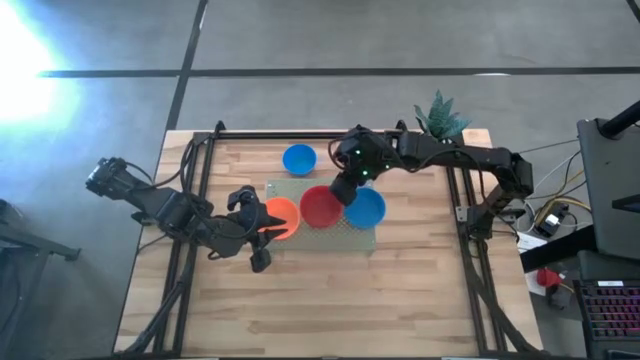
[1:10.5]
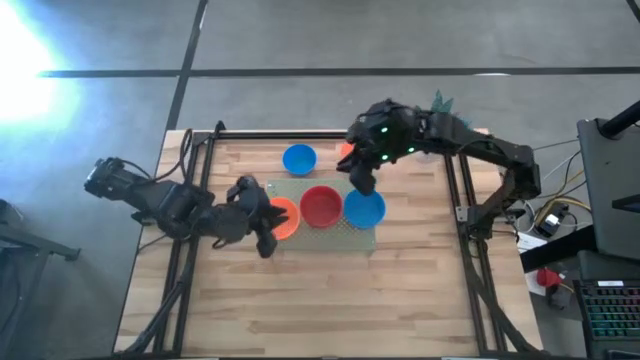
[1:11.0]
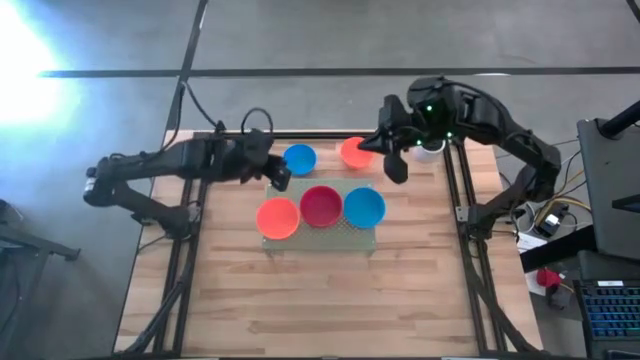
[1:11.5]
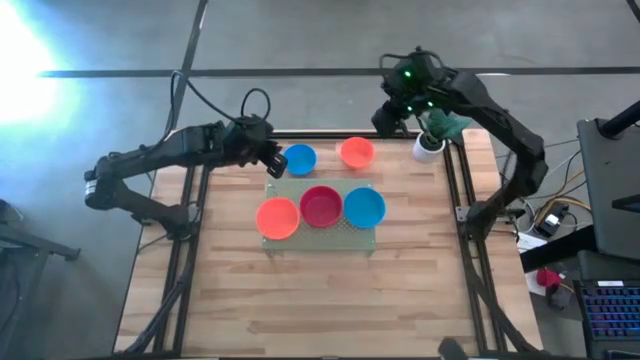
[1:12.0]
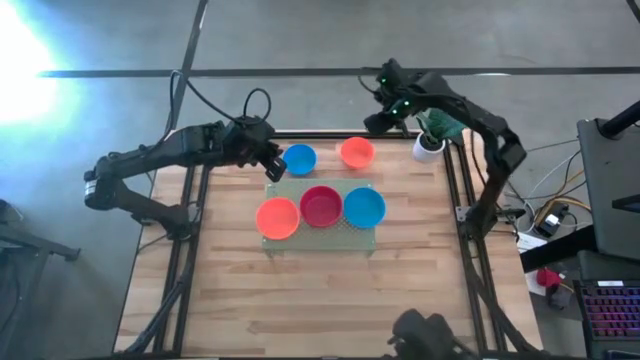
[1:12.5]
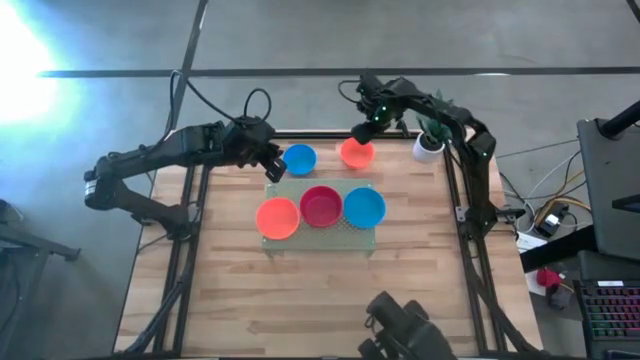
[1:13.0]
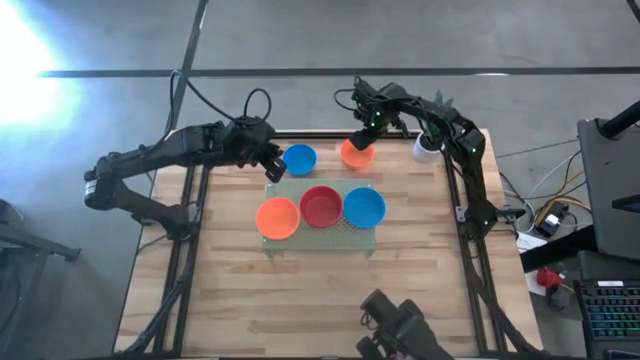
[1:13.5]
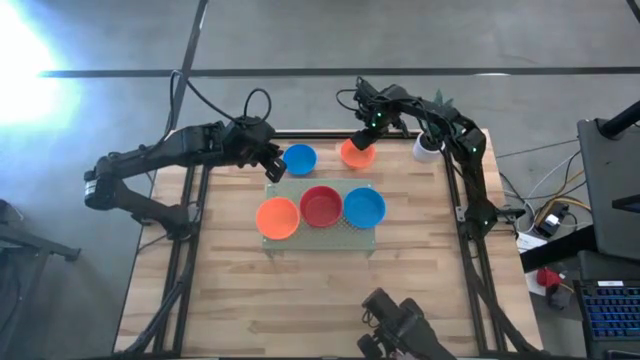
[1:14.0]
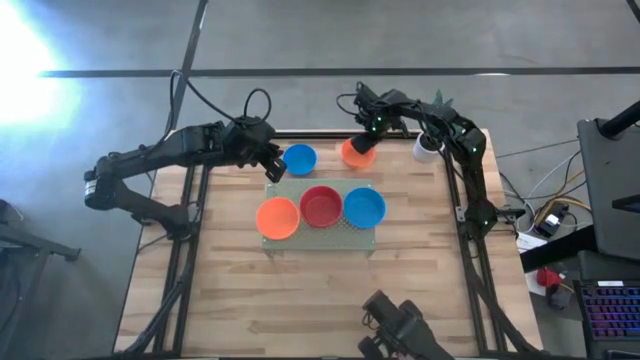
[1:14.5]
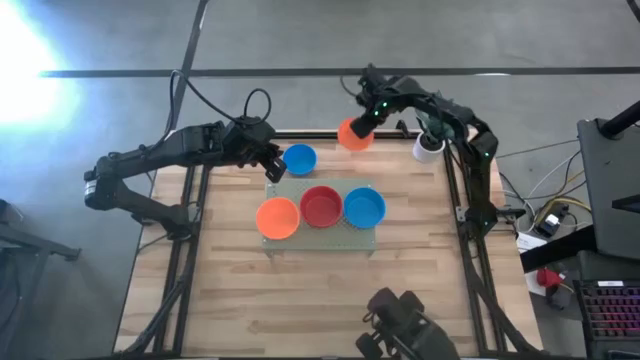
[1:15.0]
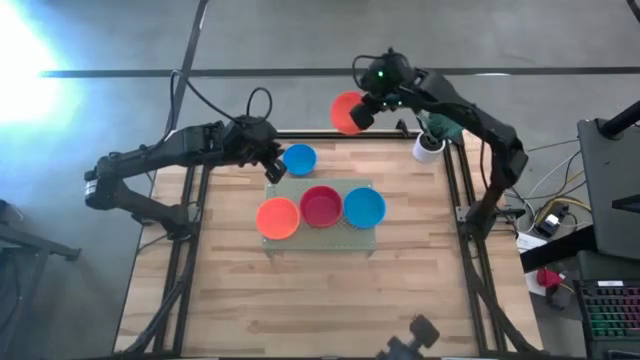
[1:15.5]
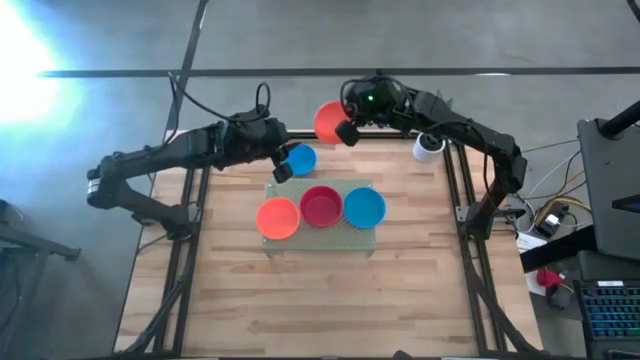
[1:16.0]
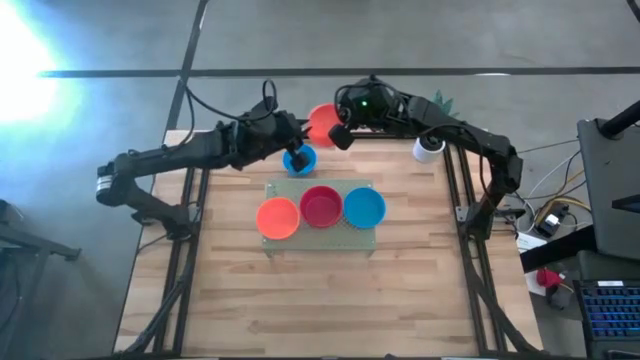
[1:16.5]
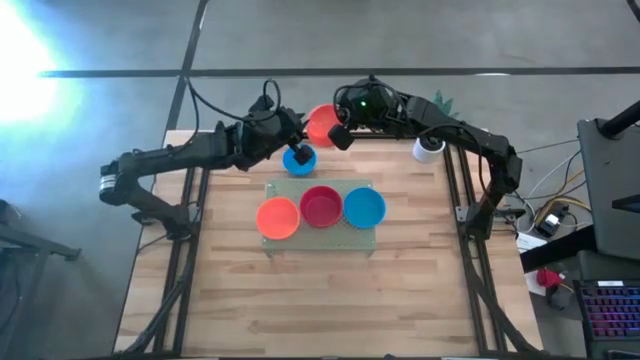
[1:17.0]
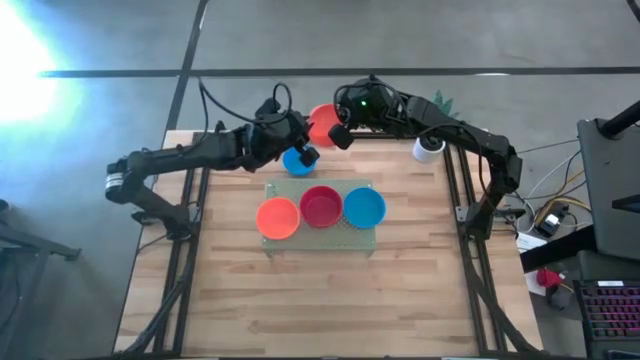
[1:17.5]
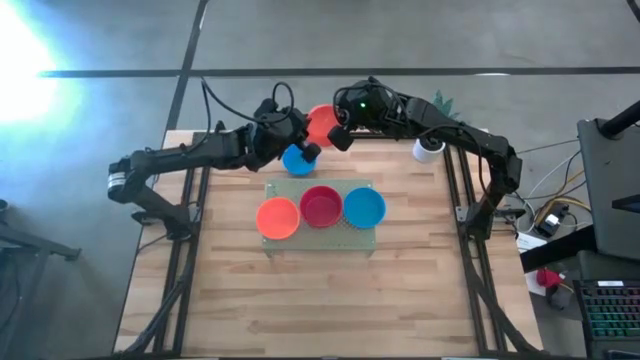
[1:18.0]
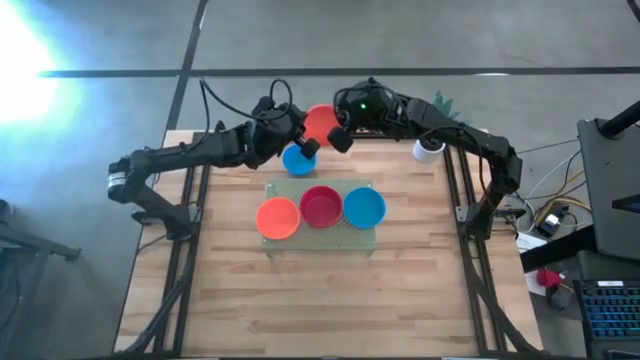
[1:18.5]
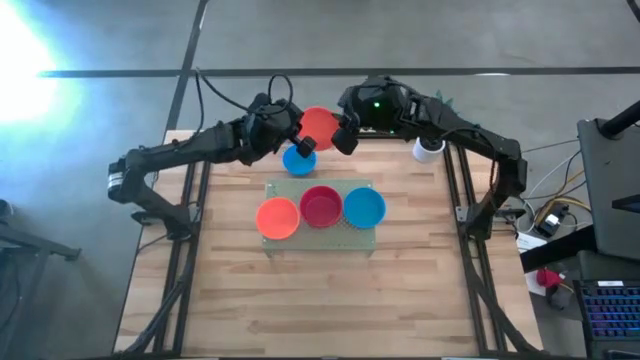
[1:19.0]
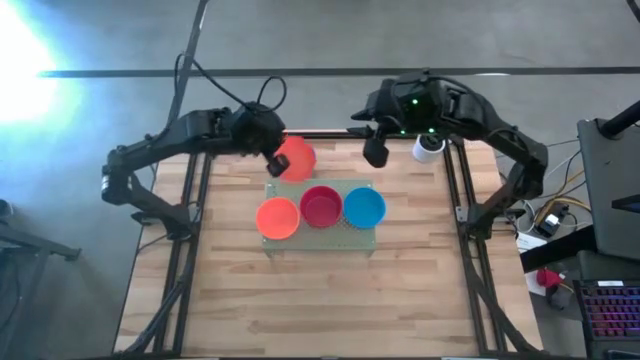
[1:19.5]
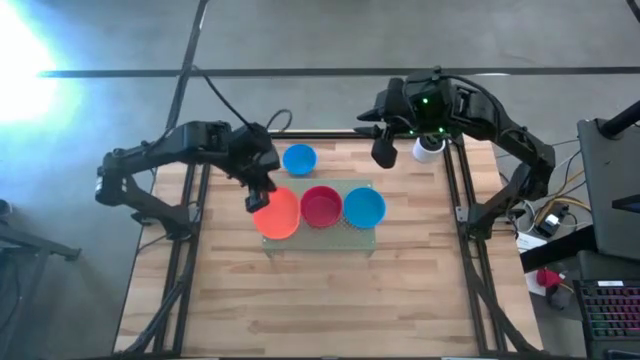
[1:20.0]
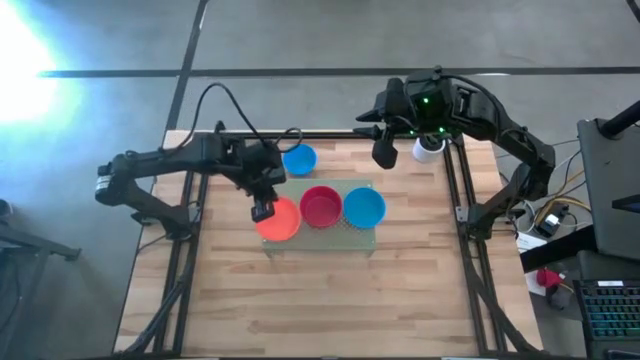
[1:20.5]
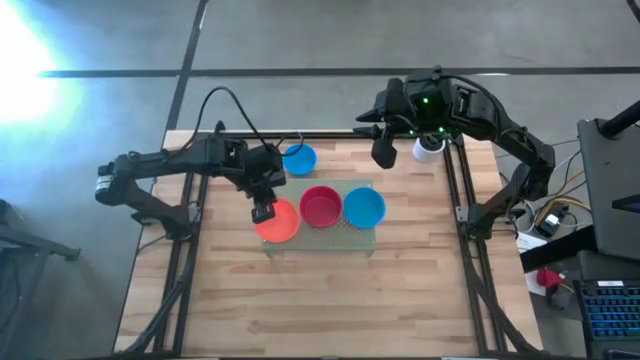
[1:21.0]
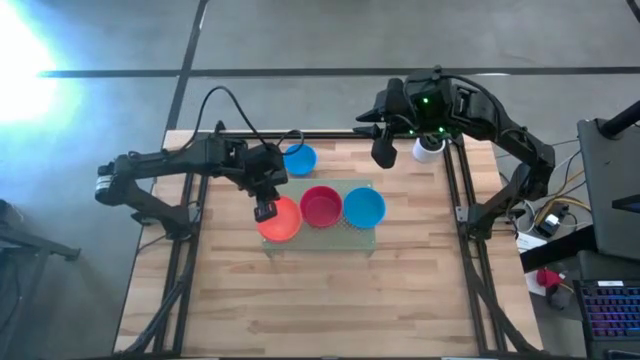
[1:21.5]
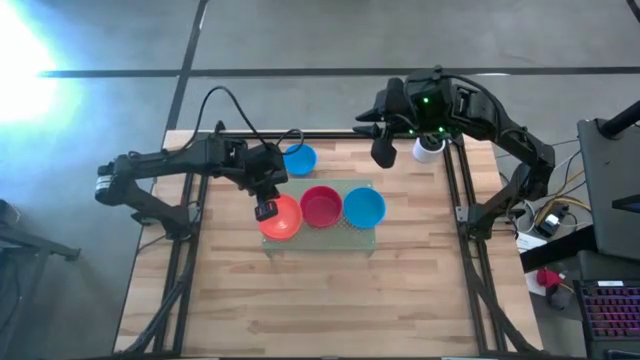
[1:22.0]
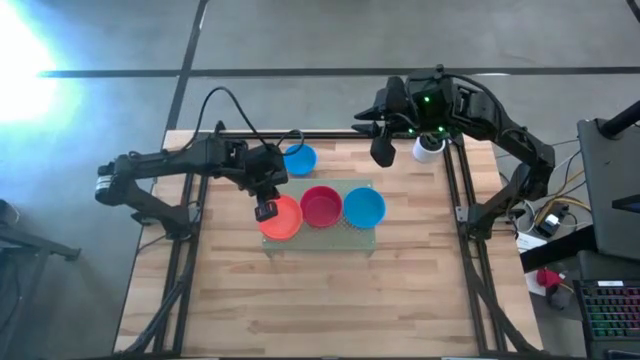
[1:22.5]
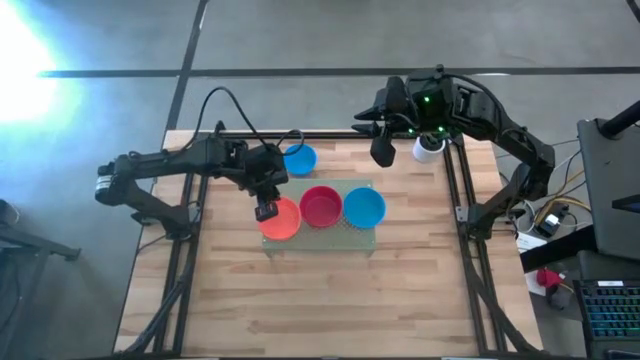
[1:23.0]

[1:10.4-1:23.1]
Task: Pick & Place Mini bowls
Stack the orange bowl on top of the other orange bowls on the shelf

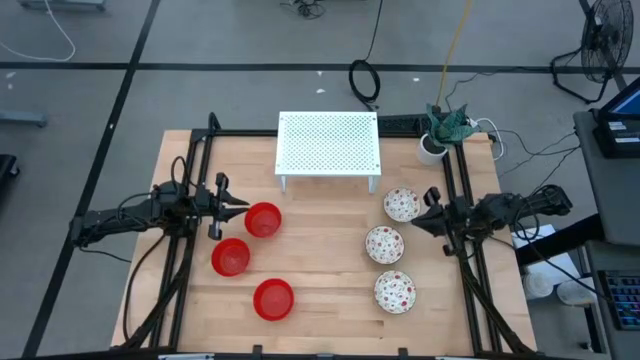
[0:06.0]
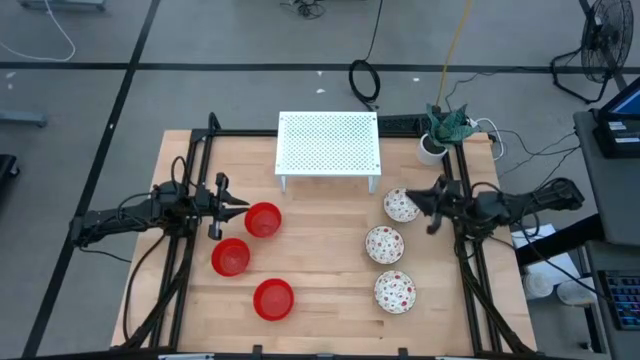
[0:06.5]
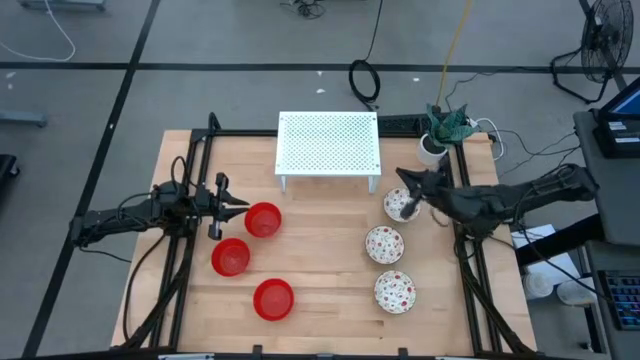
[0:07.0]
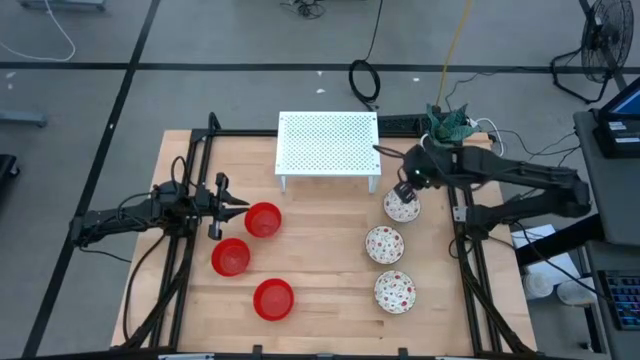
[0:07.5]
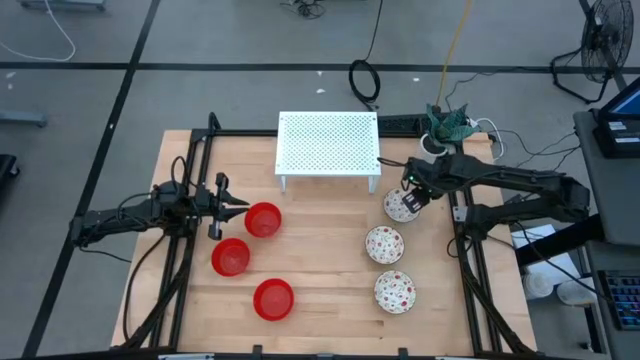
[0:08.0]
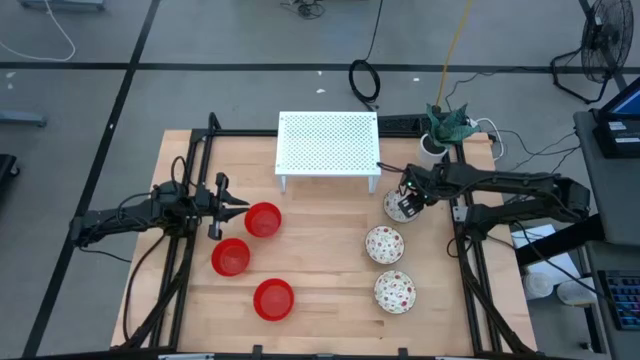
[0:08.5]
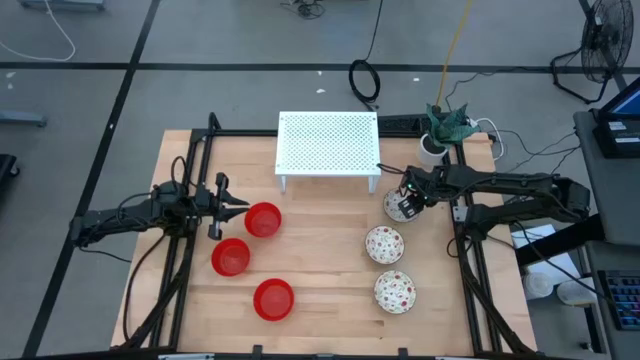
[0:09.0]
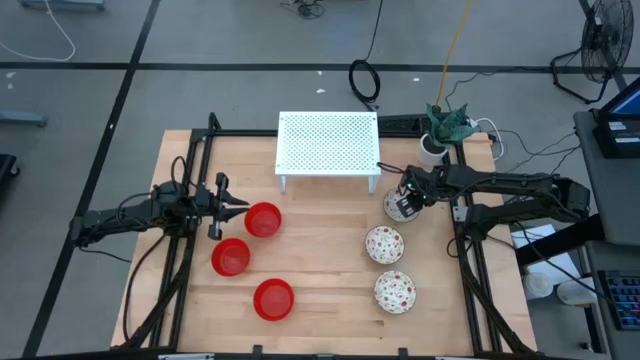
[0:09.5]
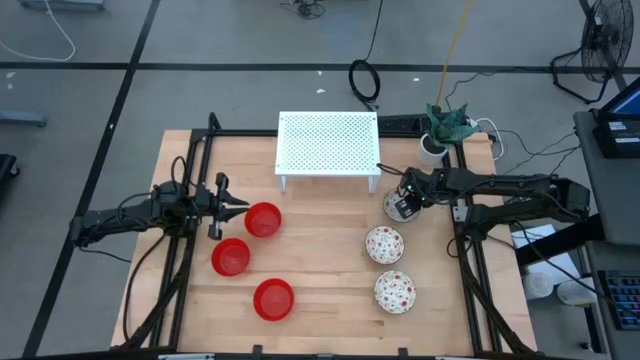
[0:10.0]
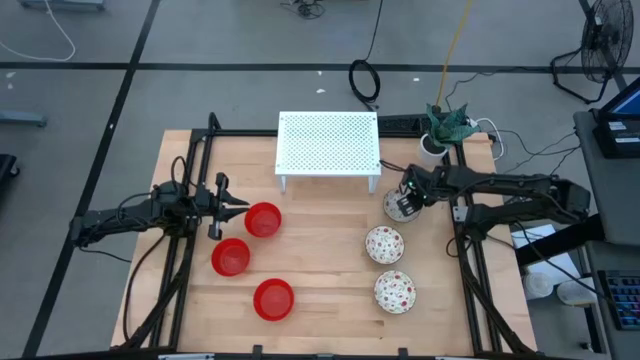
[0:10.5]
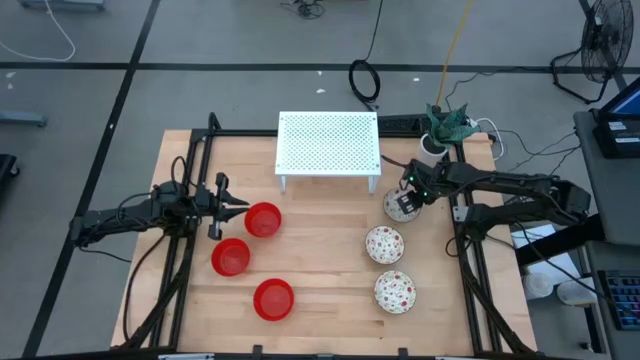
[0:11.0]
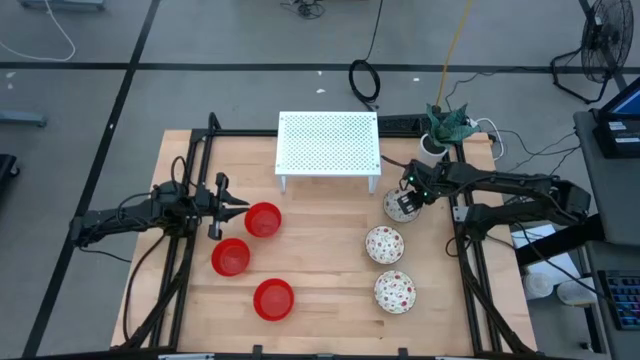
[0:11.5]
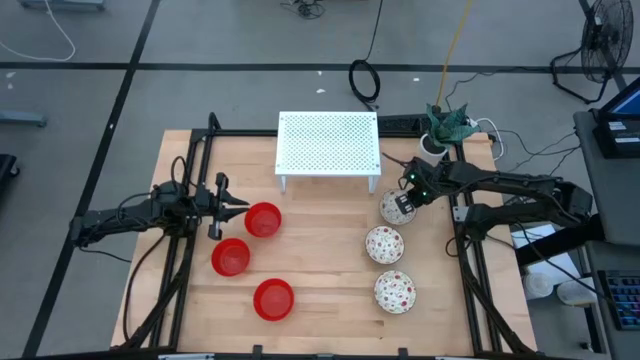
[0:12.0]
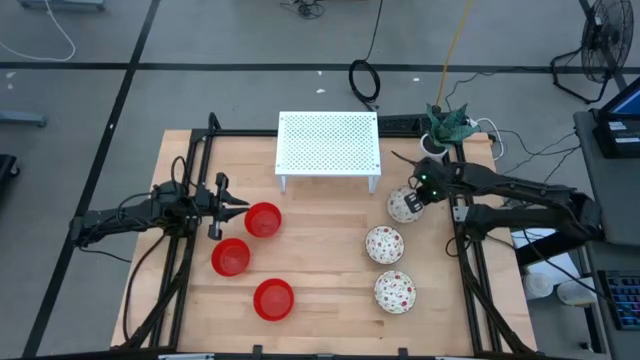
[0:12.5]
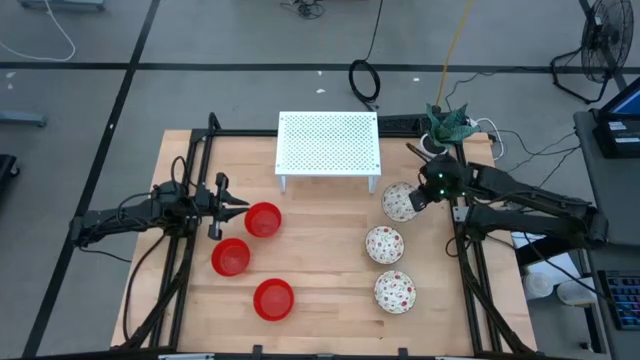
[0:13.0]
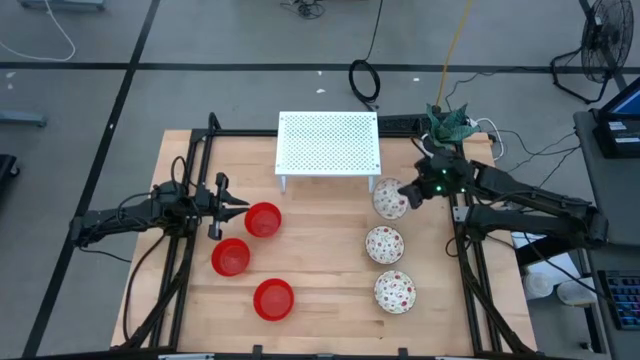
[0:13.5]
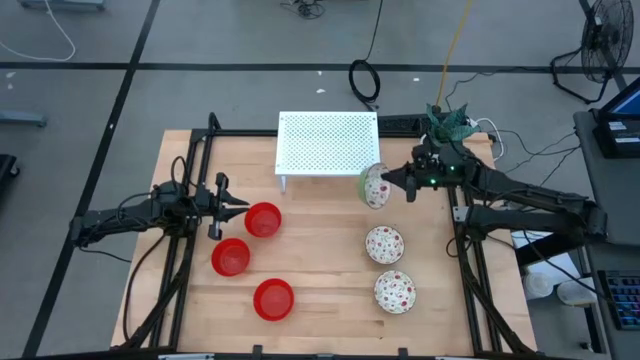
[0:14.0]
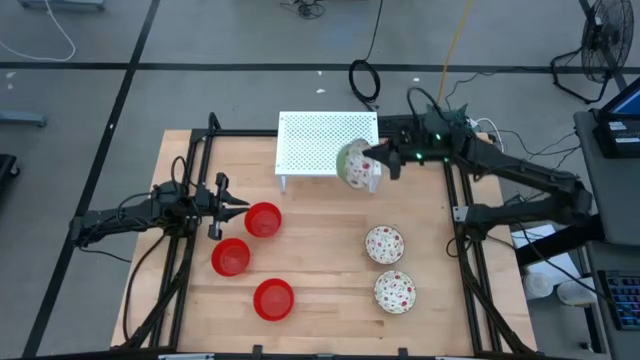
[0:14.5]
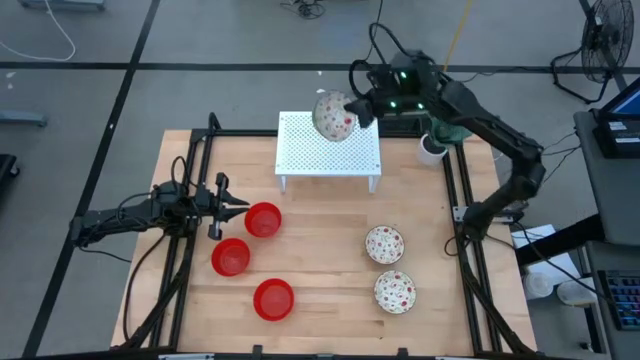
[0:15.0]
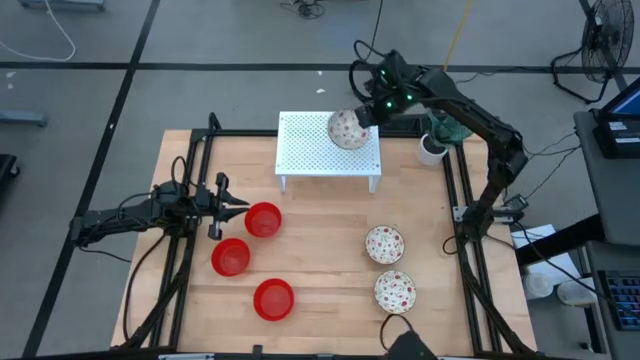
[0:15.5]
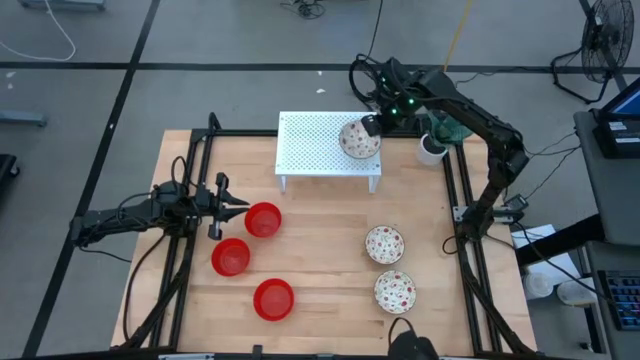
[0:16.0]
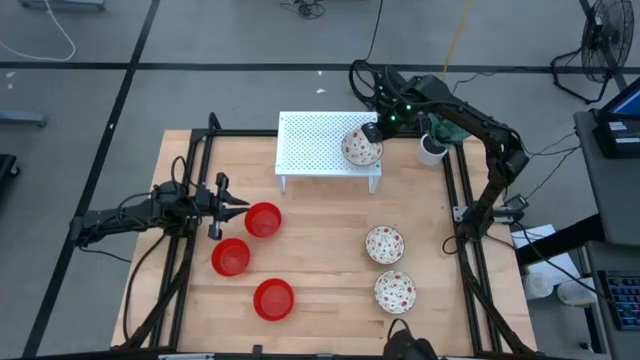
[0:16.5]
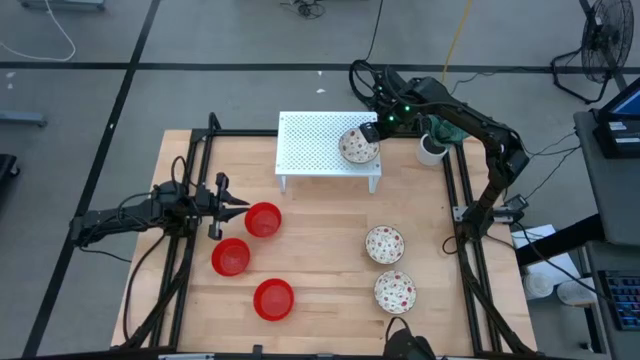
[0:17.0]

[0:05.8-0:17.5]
Task: Pick & Place Mini bowls
Put the top white patterned bowl on the shelf
